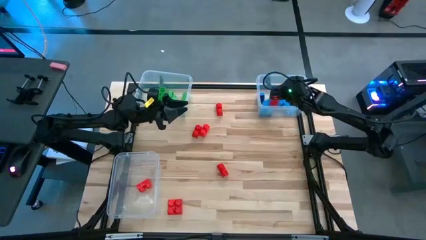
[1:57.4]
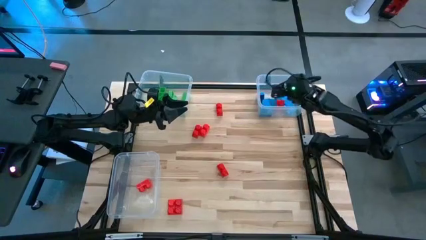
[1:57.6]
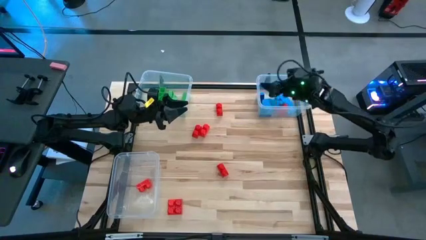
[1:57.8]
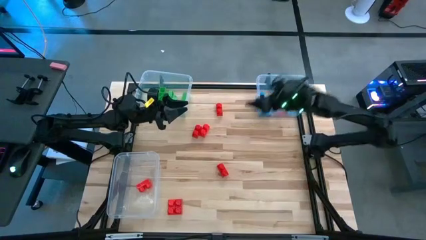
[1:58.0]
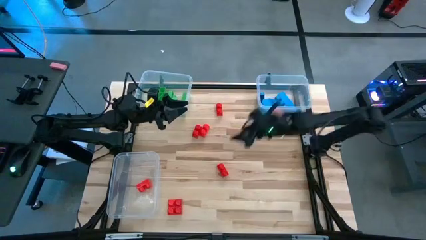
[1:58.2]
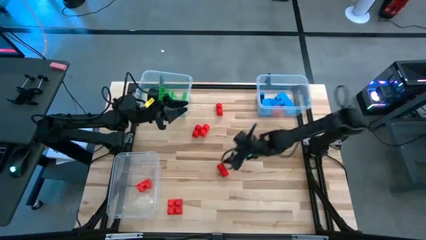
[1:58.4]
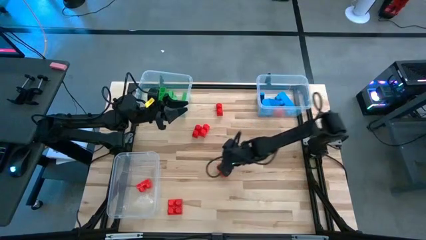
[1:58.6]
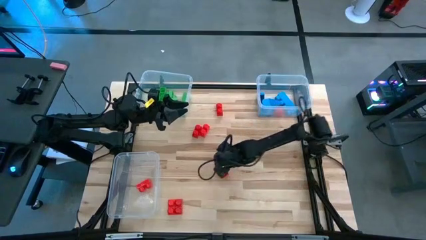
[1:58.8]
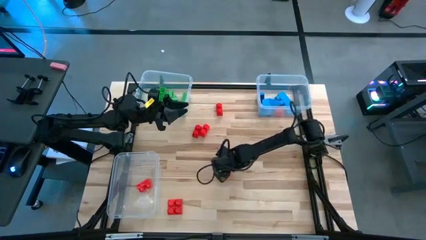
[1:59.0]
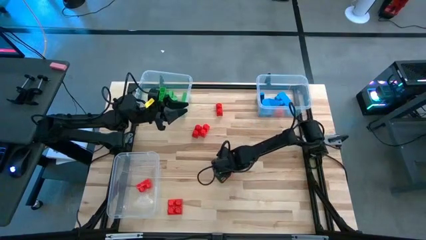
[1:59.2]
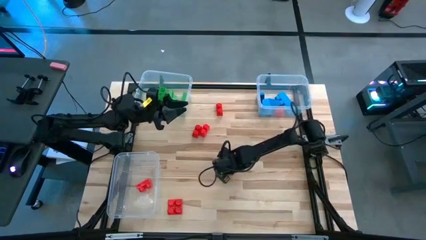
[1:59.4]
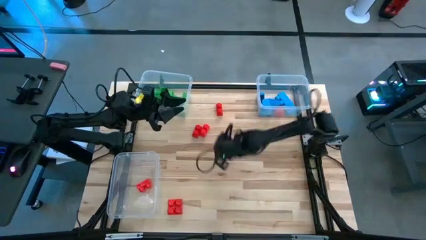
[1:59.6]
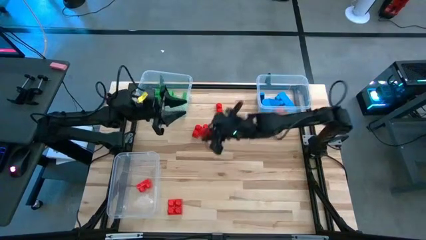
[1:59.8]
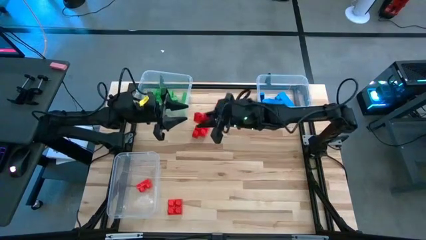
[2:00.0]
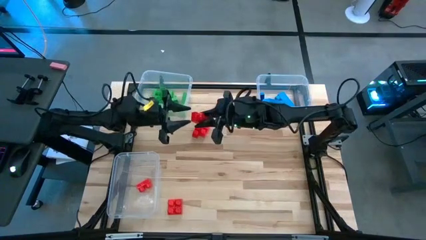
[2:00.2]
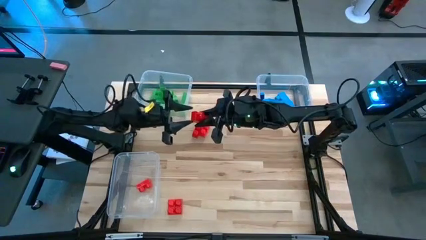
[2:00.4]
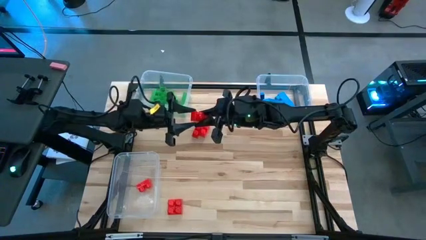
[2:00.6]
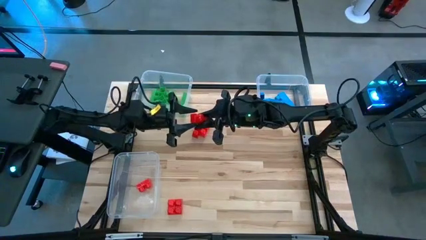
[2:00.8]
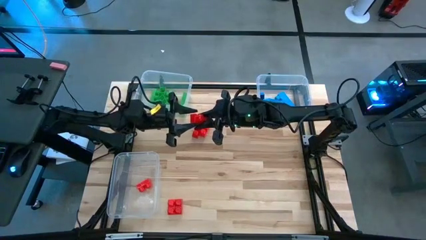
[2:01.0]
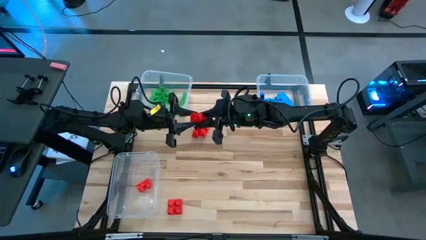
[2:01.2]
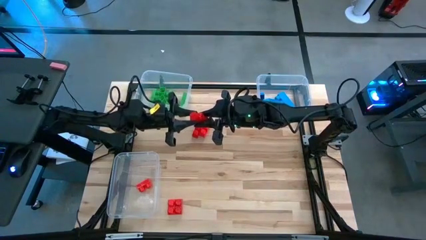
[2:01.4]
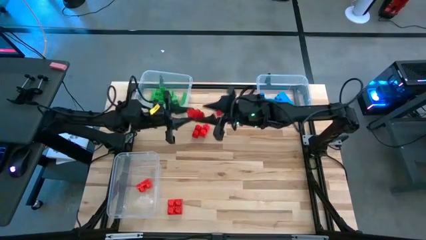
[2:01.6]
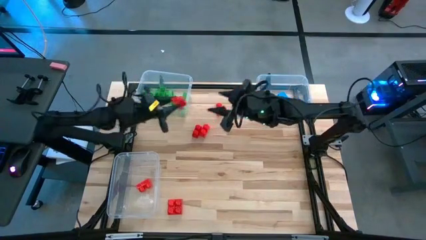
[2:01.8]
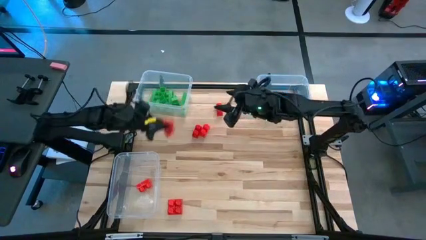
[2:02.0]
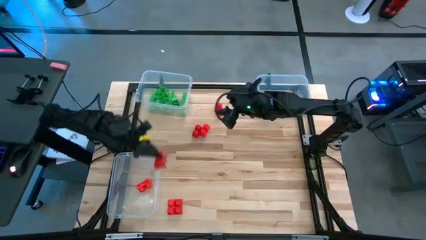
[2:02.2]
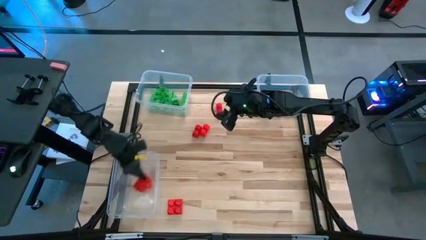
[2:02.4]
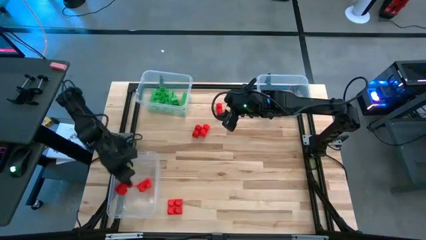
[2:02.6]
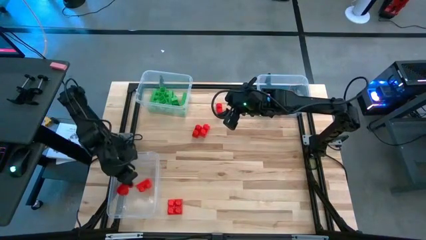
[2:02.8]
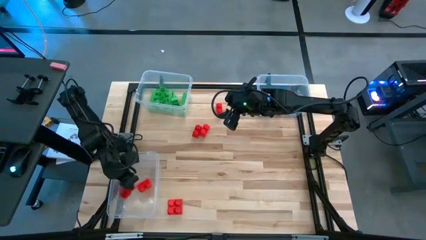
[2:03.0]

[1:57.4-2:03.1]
Task: Sort blocks
Put the red game piece into the bottom transparent bin

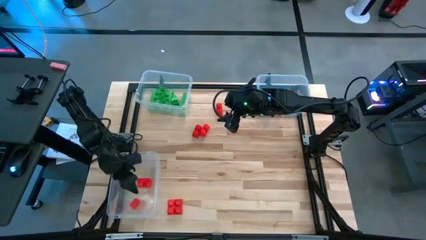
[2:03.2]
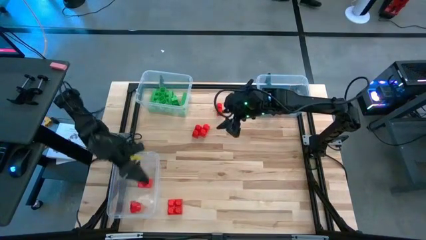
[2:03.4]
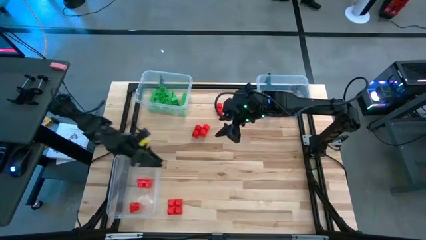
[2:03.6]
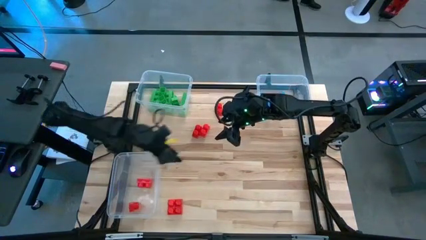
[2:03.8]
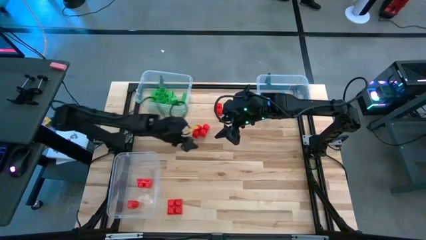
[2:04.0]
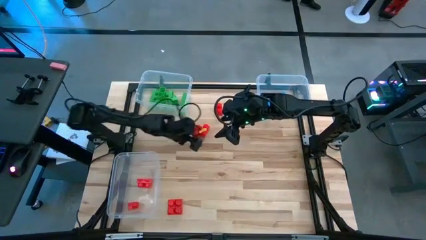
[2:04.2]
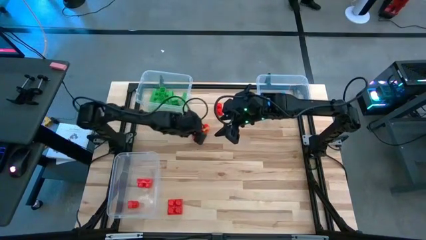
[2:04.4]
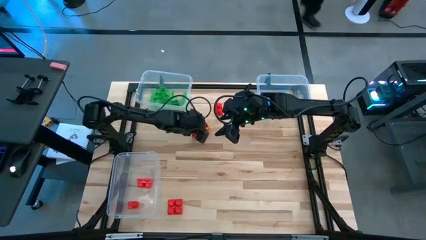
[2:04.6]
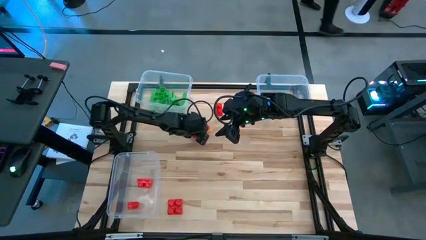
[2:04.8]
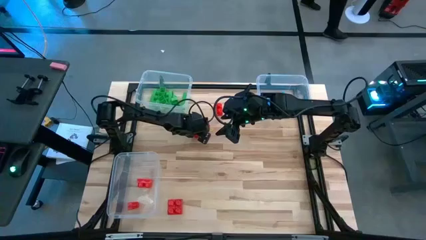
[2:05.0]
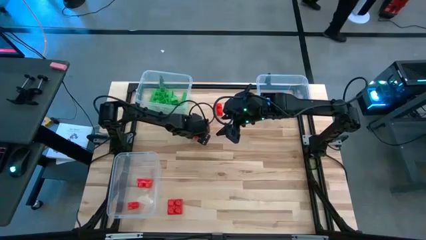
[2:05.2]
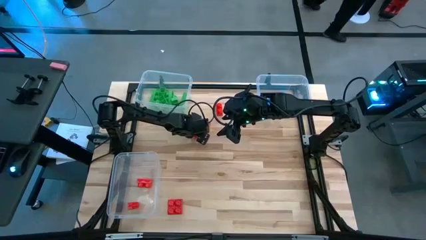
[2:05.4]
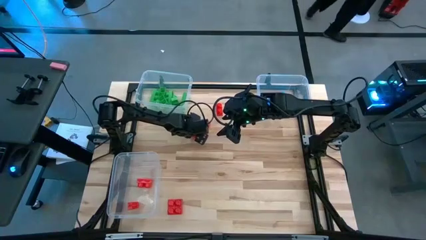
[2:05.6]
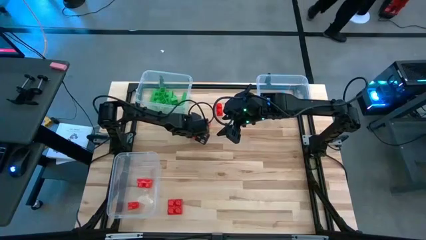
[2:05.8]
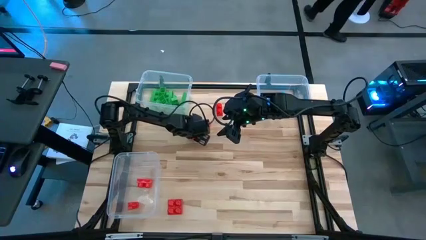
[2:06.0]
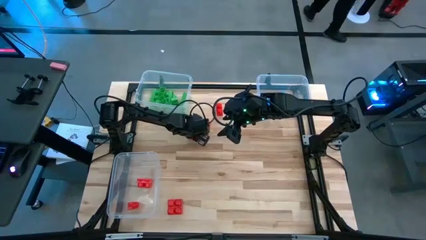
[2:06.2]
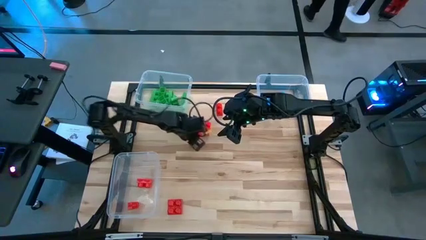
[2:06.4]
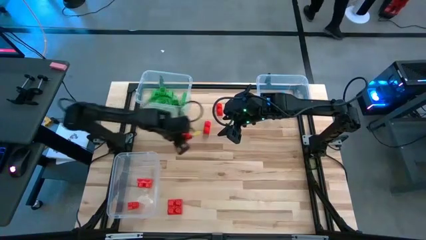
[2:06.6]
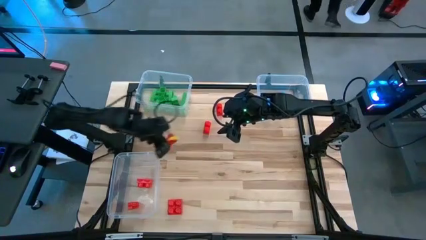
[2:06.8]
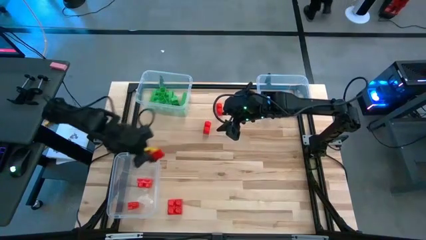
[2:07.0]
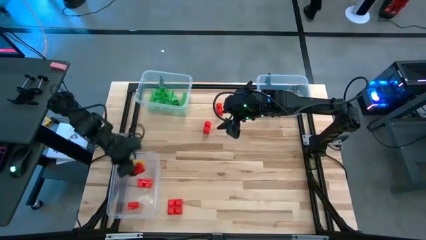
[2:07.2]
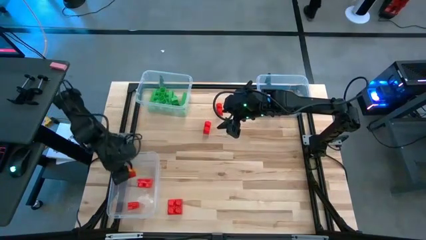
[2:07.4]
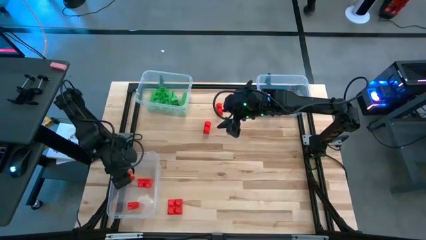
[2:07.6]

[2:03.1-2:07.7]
Put the red game piece into the bottom transparent bin

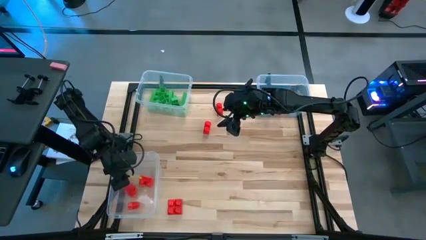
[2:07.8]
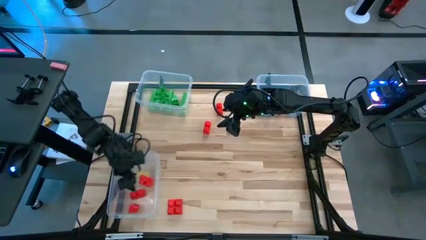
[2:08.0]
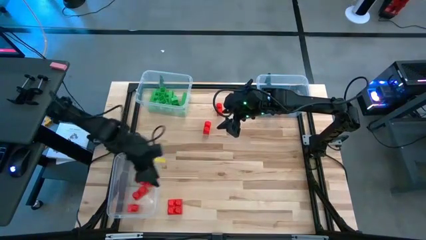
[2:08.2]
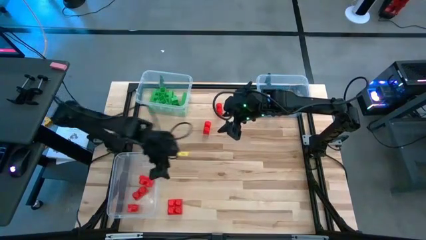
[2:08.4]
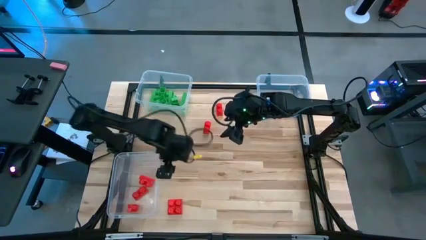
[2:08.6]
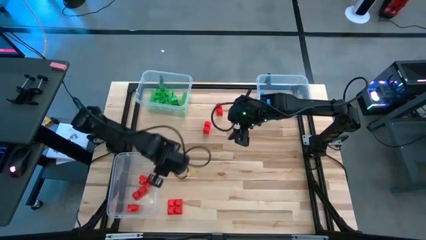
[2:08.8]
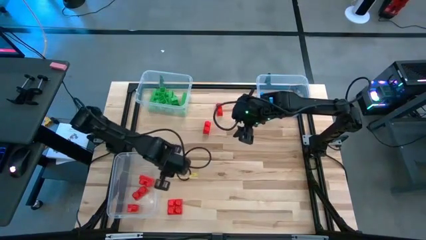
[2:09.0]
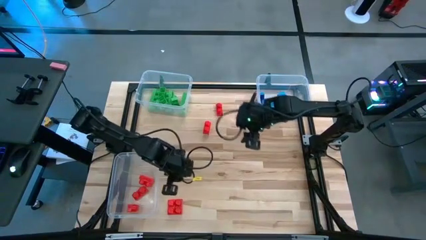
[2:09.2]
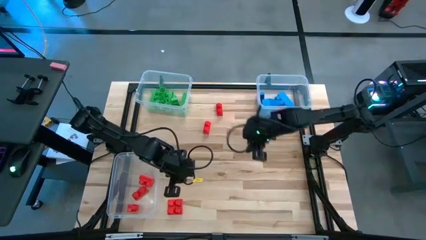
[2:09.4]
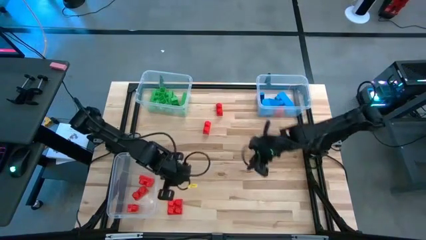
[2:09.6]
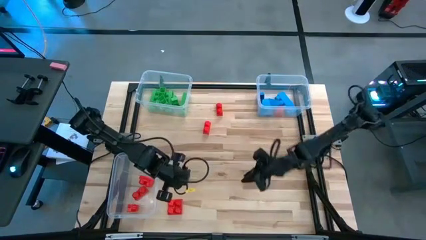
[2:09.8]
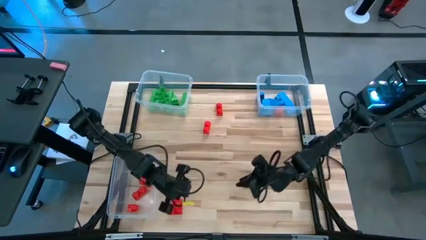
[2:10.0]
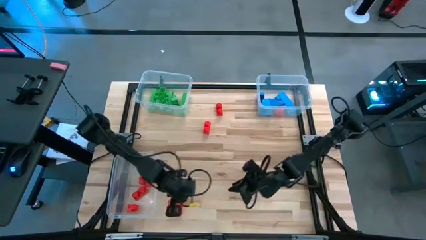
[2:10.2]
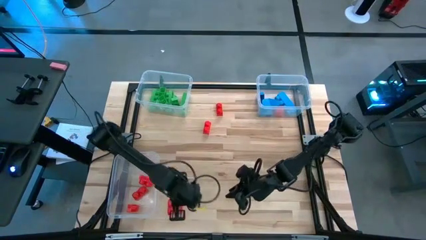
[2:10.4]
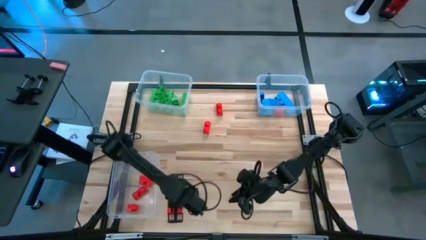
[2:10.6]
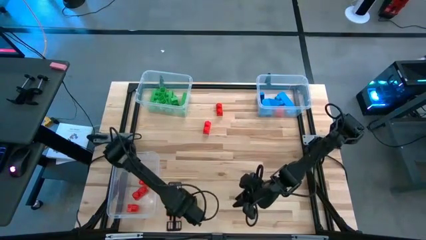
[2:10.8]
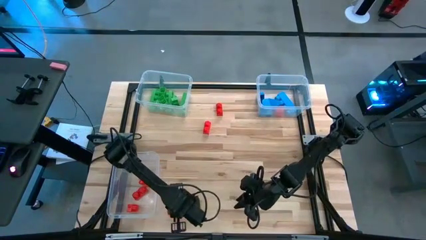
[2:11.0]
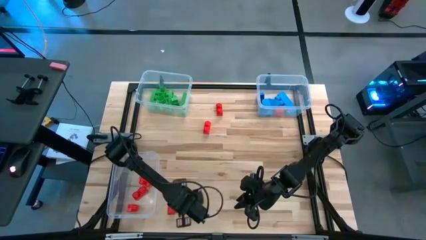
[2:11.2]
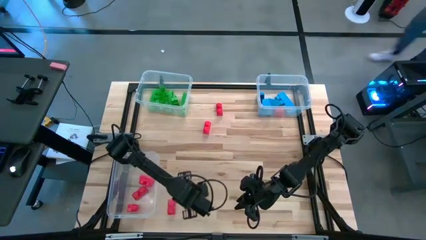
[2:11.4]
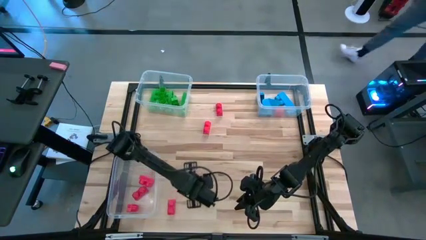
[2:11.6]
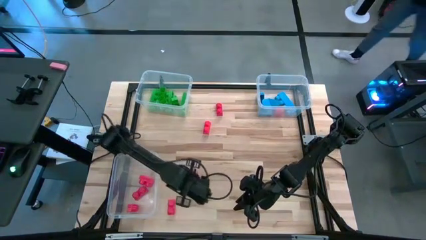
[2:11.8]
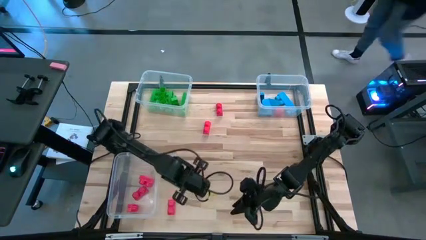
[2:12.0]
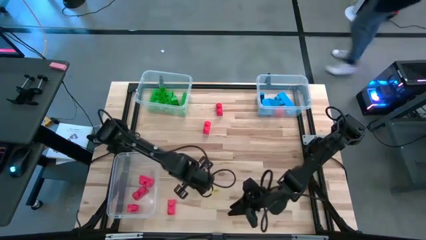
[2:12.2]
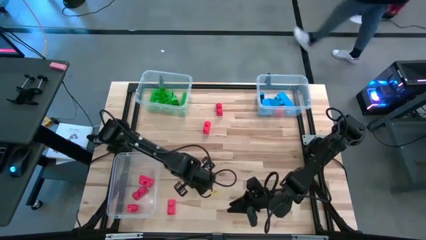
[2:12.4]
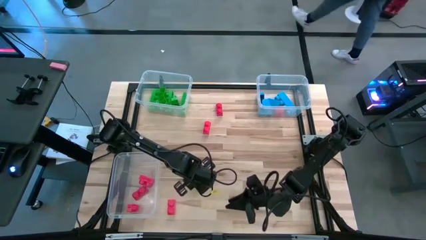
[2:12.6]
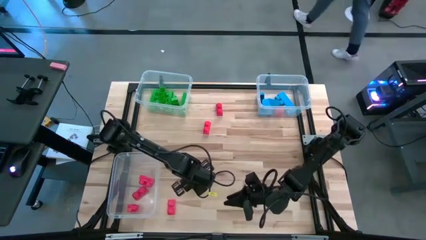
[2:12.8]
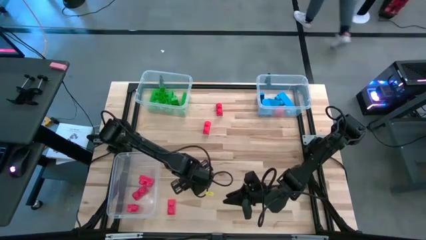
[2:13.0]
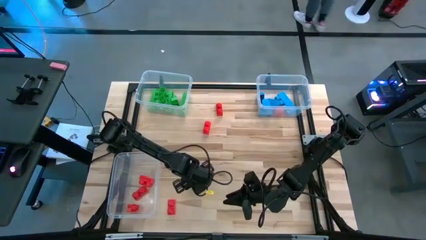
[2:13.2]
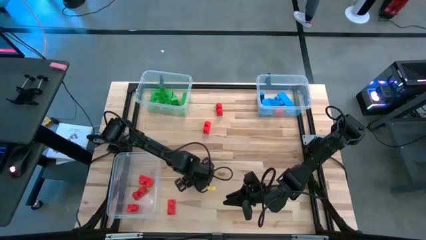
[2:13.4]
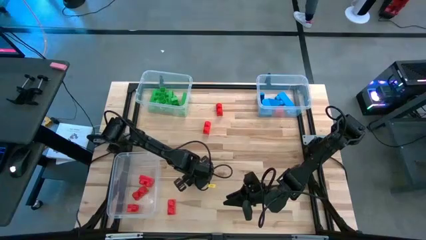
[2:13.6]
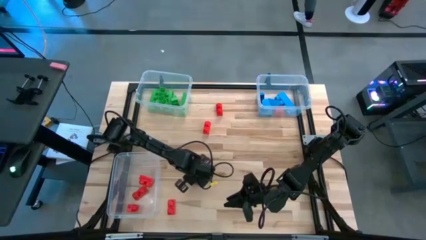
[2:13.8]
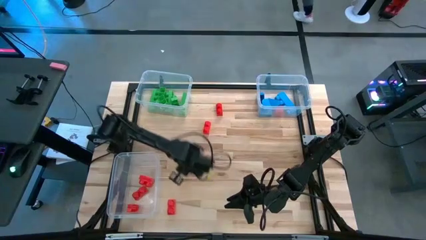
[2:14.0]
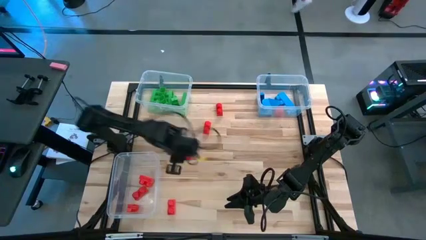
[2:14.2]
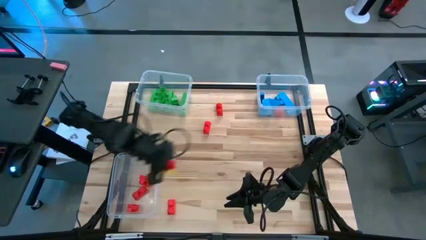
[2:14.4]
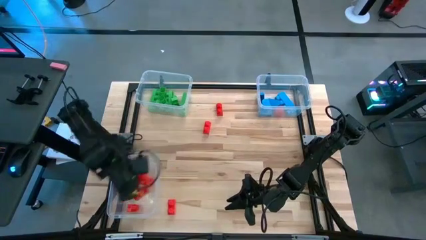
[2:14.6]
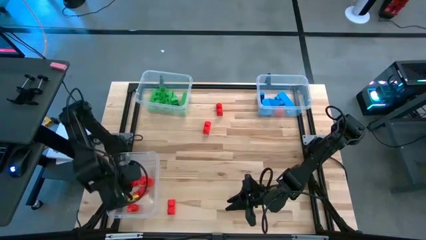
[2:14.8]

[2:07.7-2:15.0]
Put the red game piece into the bottom transparent bin
